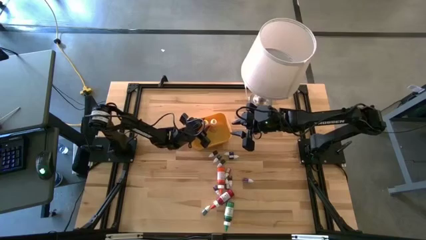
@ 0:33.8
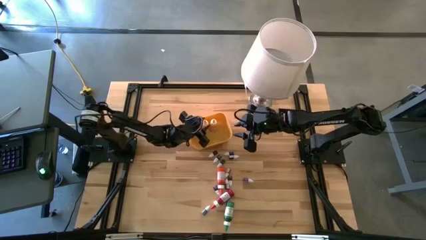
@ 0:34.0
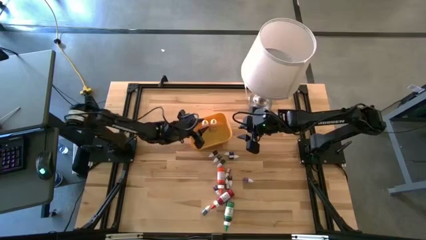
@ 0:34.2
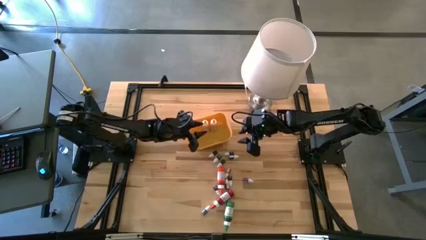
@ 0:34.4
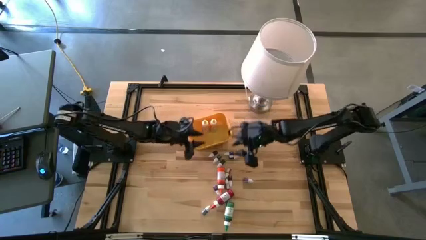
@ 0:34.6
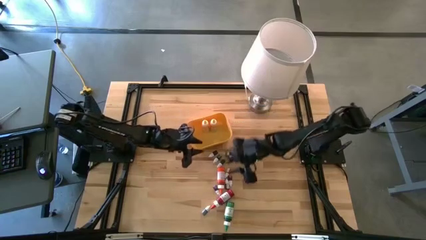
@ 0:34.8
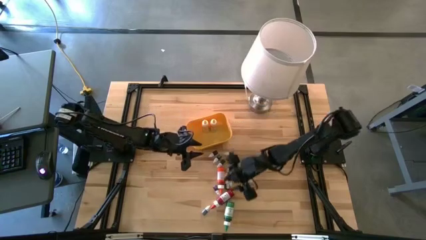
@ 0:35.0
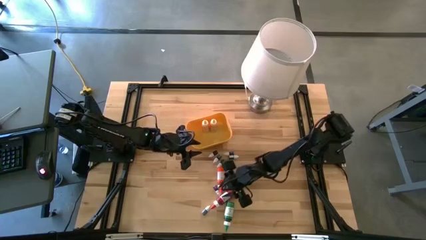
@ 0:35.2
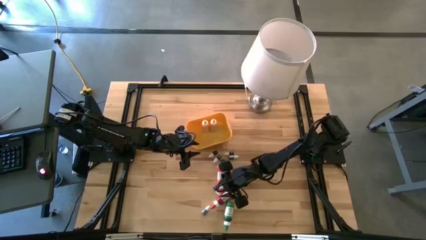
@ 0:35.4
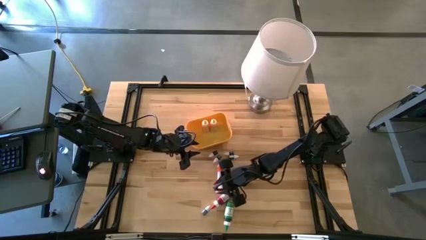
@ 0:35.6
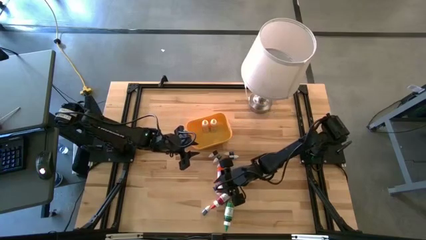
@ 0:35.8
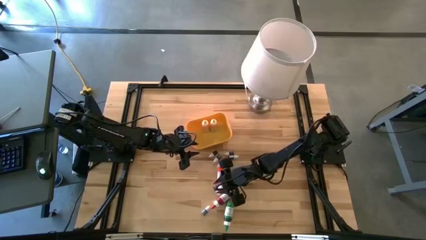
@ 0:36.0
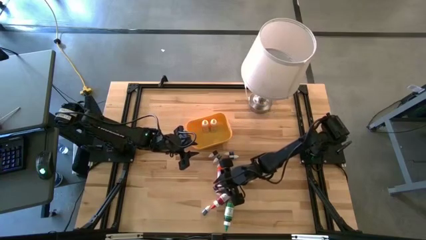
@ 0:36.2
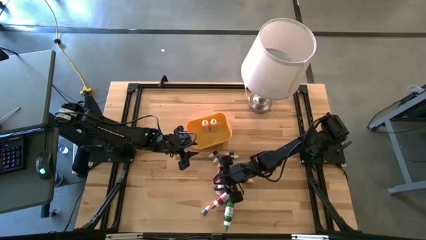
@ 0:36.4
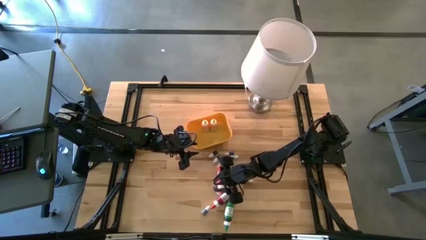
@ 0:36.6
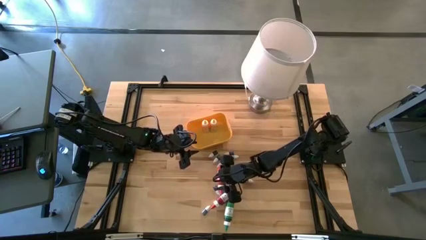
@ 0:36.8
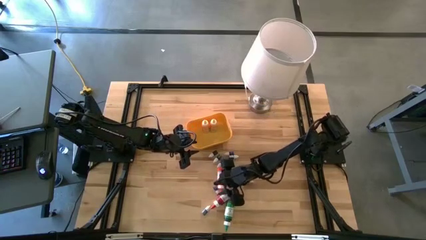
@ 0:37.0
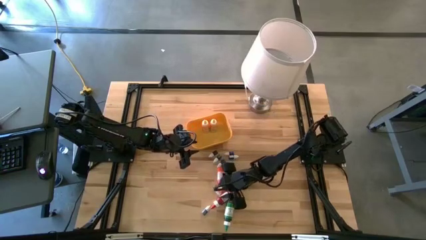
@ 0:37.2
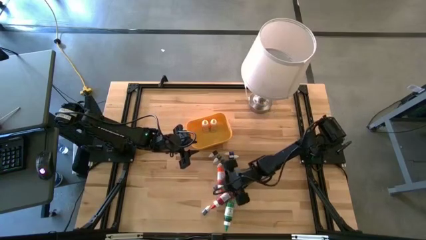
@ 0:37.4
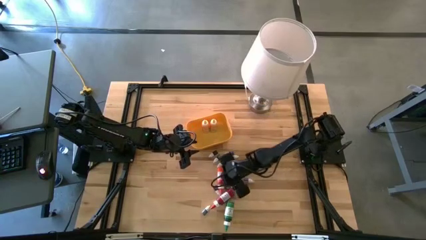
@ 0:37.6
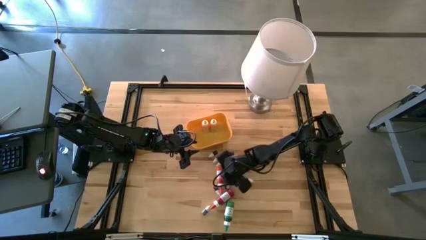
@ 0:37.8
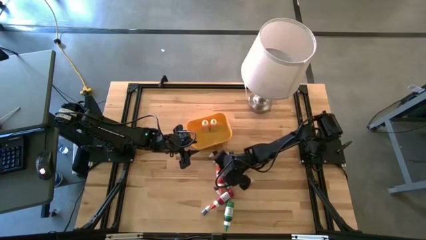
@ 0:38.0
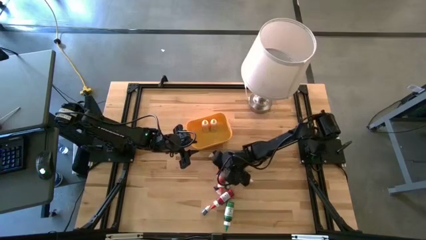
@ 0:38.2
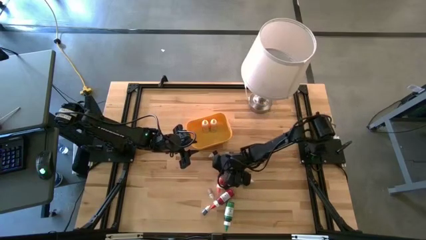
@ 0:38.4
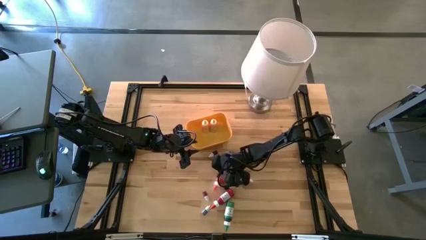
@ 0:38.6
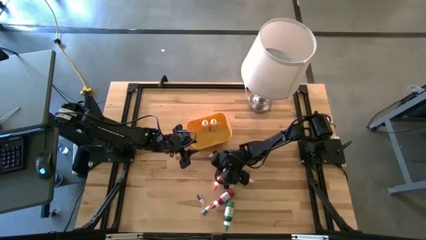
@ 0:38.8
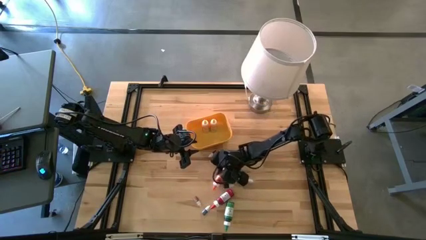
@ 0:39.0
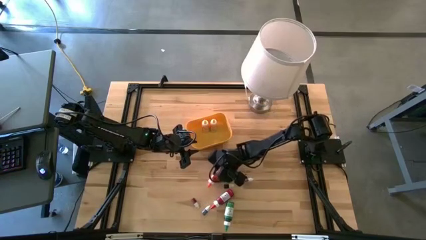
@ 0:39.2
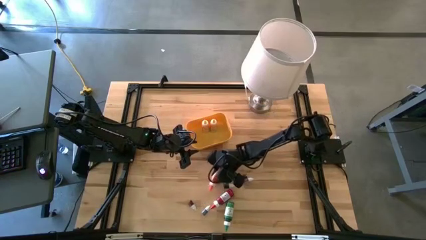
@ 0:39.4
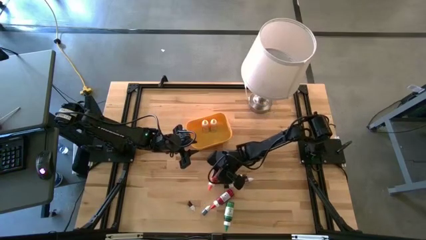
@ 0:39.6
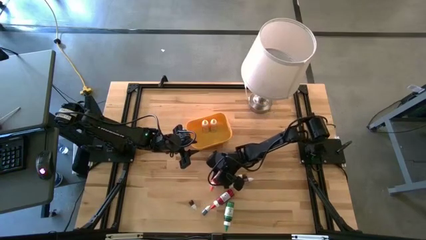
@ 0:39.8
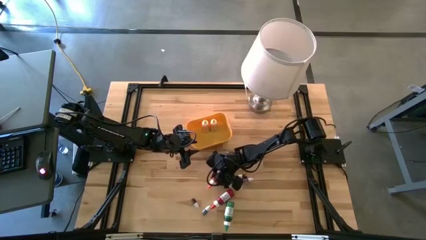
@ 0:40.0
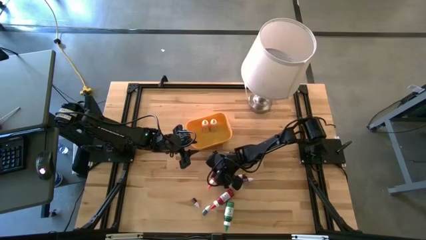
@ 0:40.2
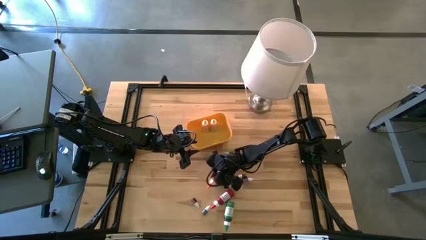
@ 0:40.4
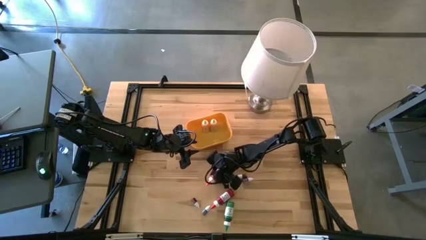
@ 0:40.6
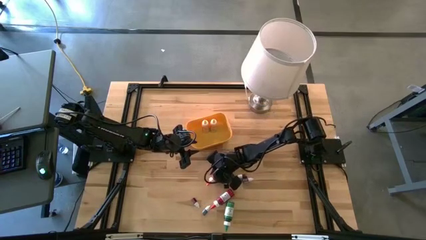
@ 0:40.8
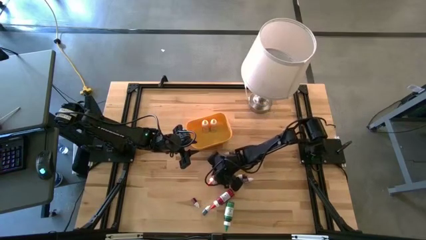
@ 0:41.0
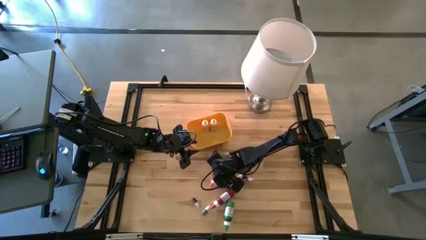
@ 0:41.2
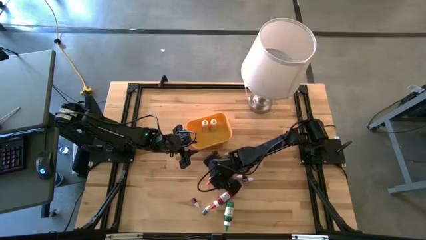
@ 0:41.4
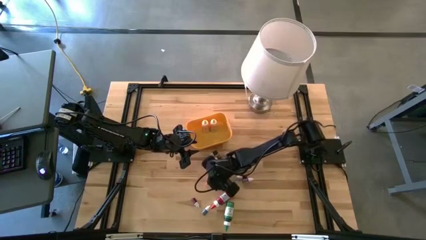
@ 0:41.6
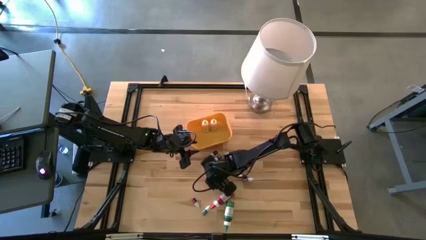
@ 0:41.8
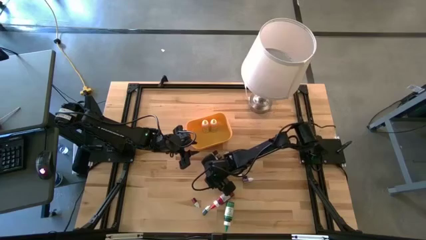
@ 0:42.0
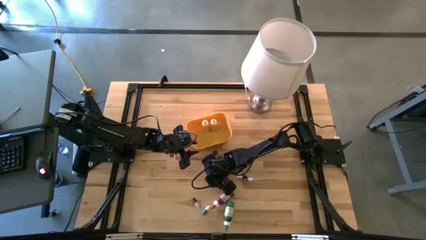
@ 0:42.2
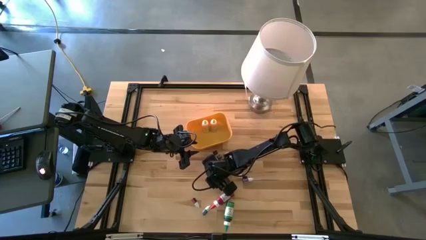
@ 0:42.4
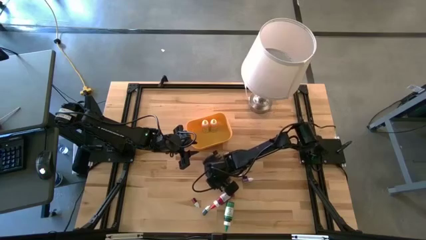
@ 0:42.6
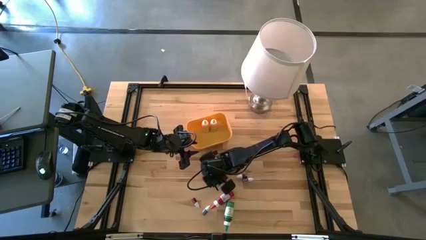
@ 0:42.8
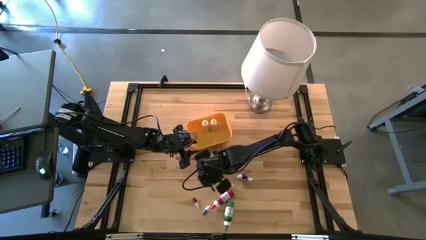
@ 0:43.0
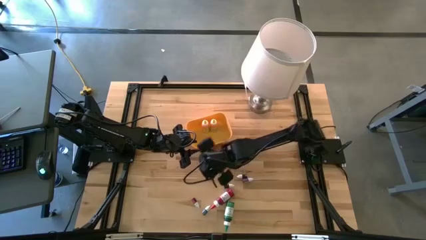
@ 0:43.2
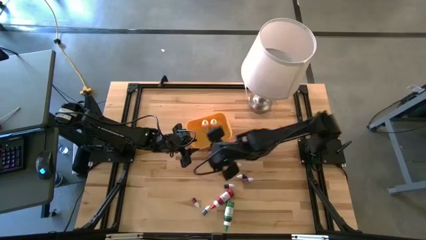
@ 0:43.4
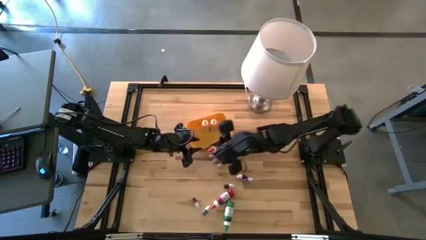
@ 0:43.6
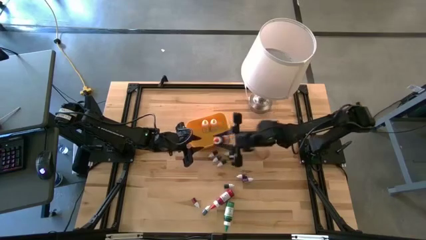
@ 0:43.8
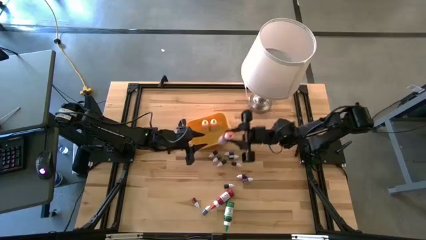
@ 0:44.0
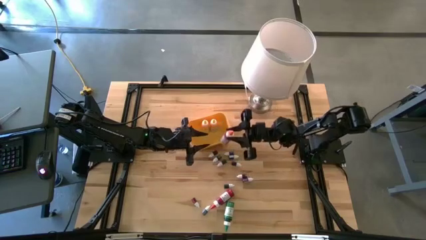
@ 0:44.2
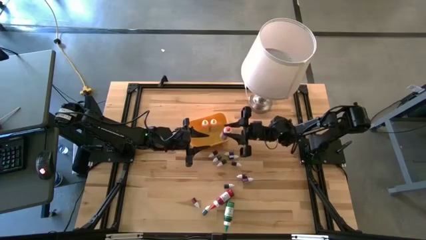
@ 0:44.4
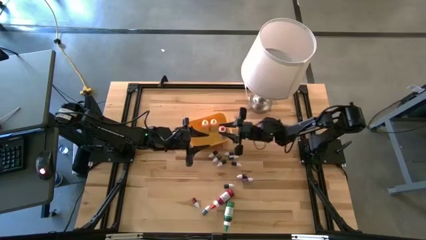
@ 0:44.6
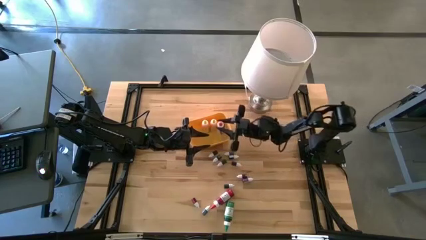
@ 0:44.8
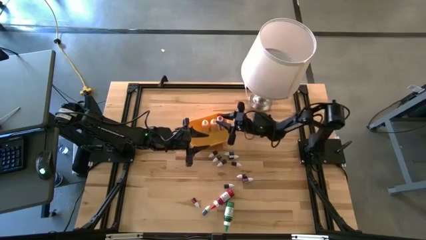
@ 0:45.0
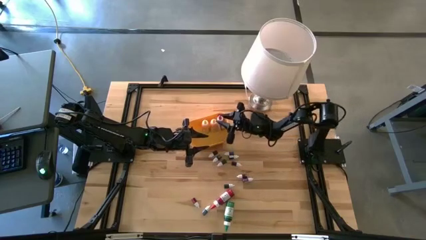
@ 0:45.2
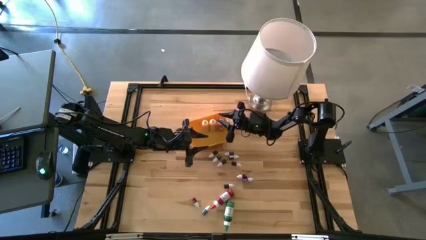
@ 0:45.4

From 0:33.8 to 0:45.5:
Task: Pick & Place food coloring
Put the large orange food coloring bottle into the yellow bin
